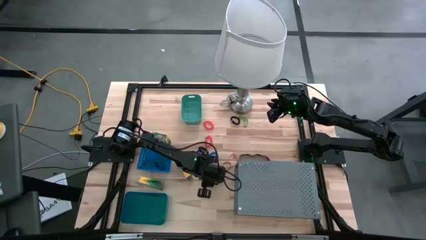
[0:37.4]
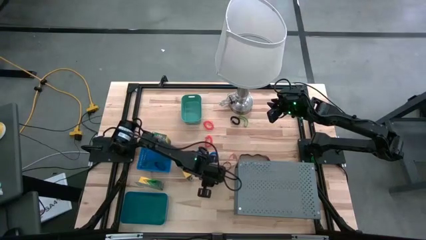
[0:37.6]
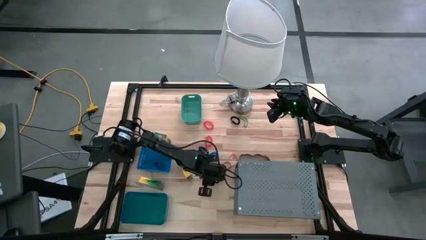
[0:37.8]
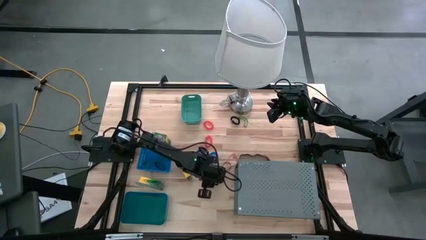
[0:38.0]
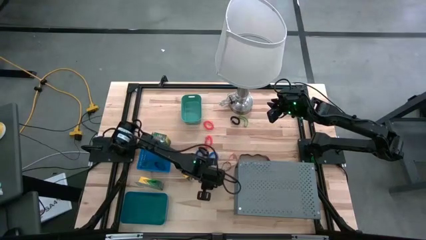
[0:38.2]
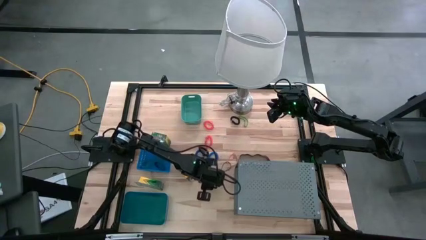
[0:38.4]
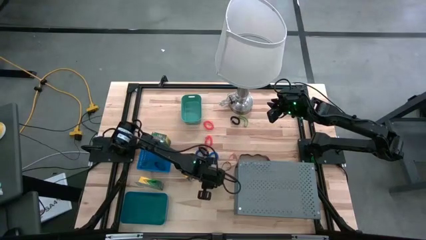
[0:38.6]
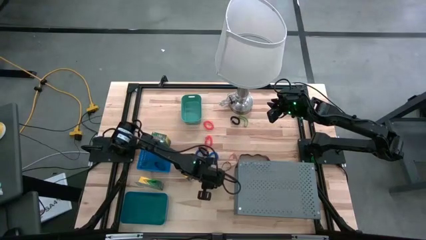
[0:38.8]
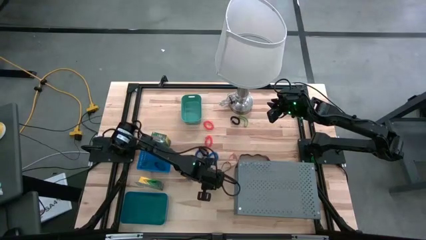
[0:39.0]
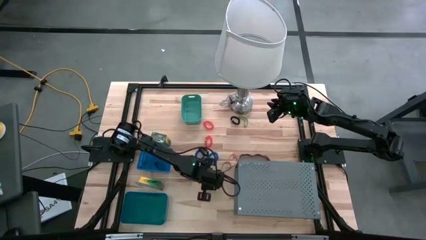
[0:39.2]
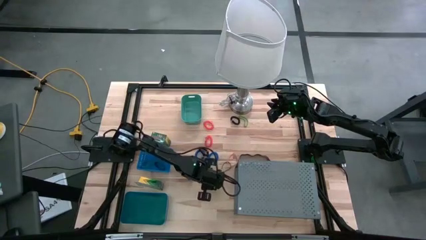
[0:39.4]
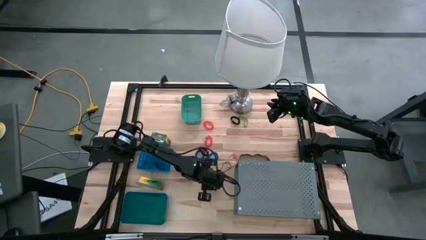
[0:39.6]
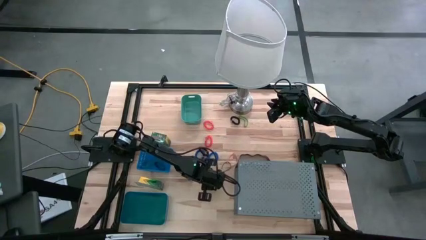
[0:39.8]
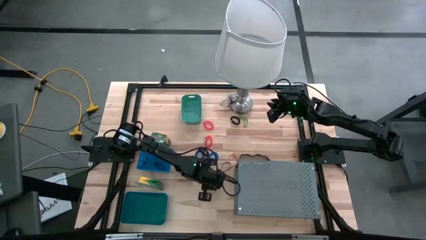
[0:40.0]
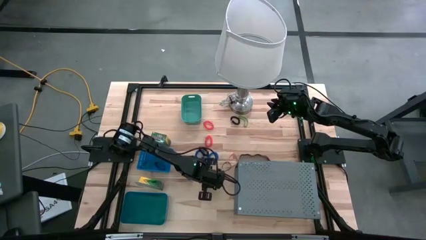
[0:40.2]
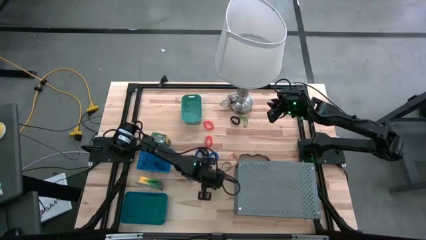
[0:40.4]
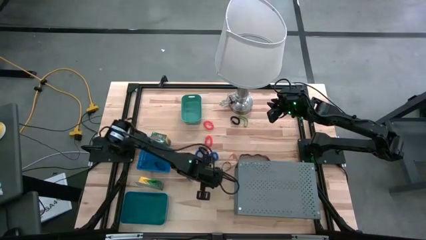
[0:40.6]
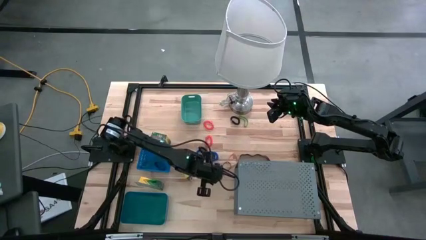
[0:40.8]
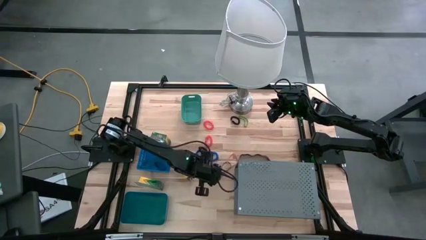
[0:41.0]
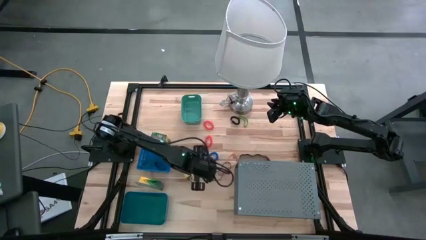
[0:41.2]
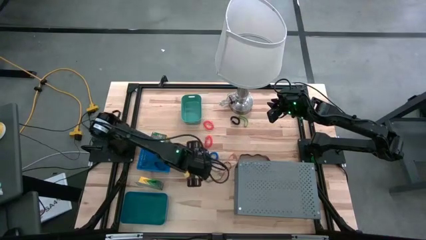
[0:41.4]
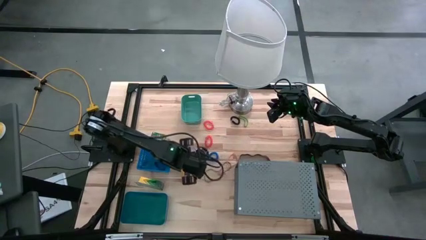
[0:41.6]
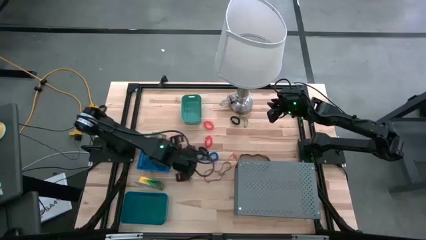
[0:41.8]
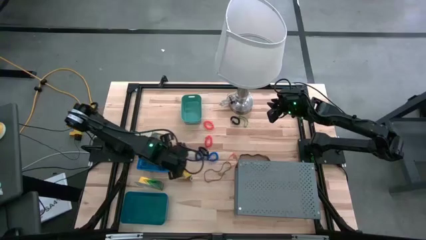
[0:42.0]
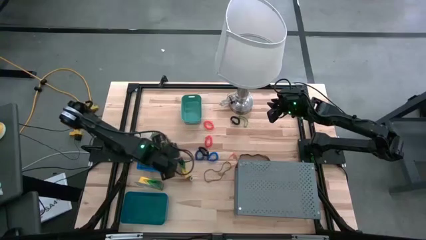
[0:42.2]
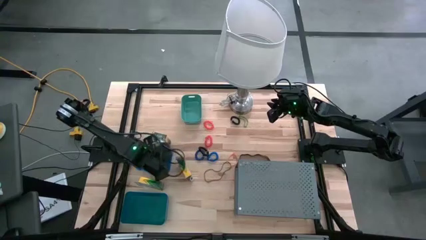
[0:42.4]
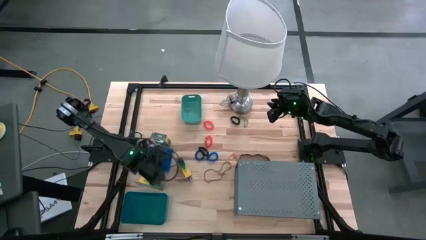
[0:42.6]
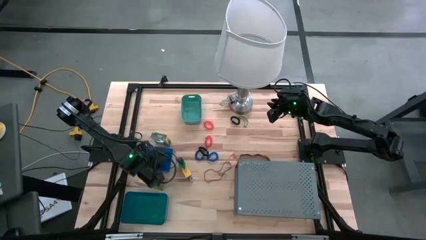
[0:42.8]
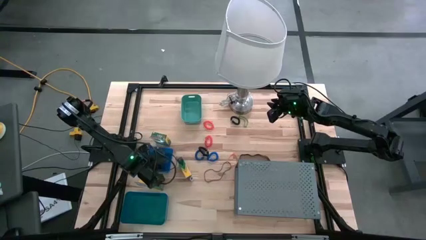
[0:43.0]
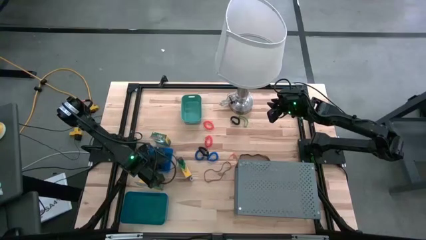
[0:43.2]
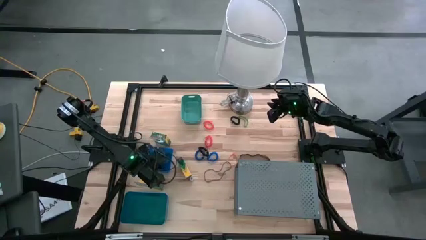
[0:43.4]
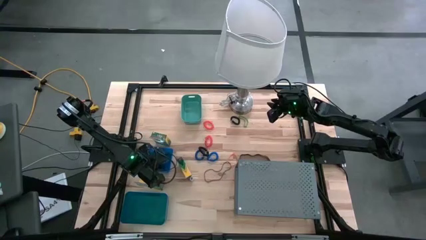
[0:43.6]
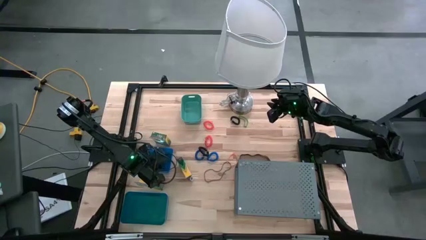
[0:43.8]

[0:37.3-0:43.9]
Task: Pick & Place Office Desk Supplies
Put the blue rubber bands into the top blue bin

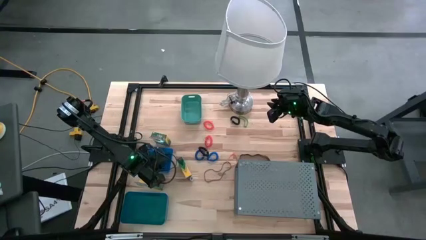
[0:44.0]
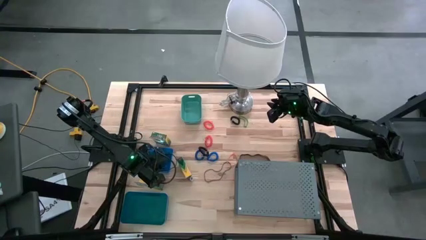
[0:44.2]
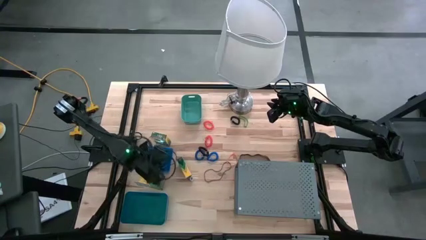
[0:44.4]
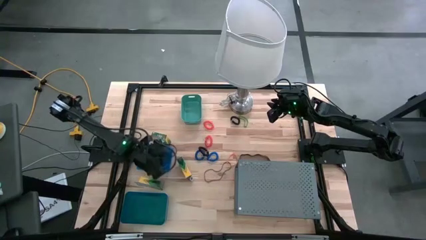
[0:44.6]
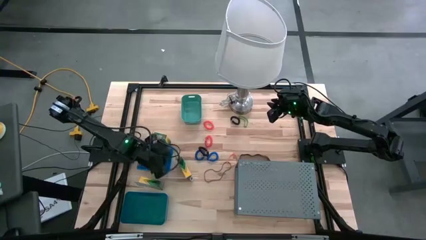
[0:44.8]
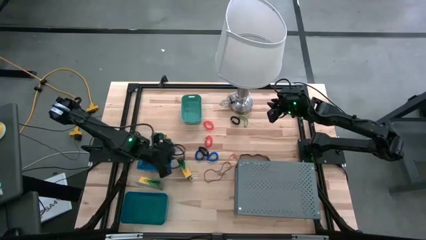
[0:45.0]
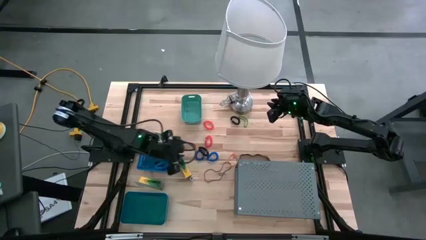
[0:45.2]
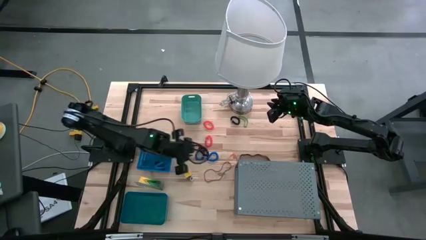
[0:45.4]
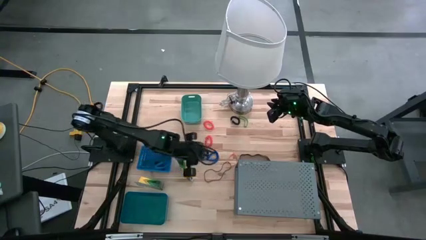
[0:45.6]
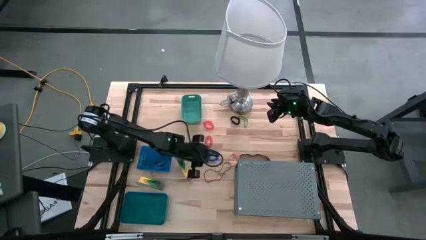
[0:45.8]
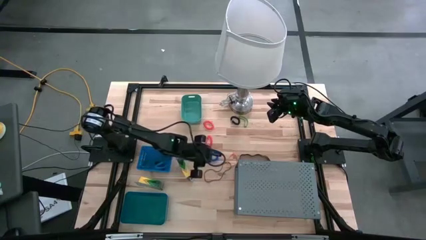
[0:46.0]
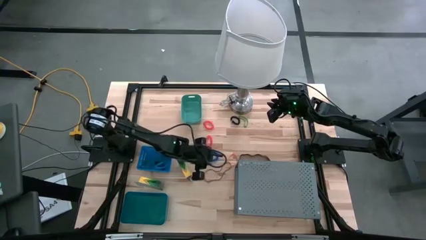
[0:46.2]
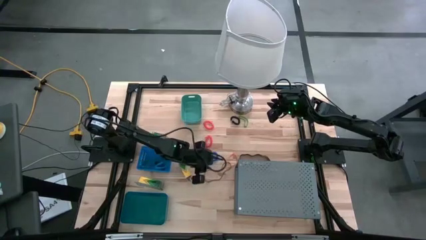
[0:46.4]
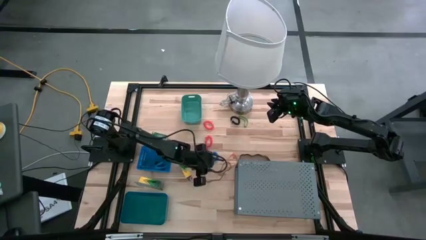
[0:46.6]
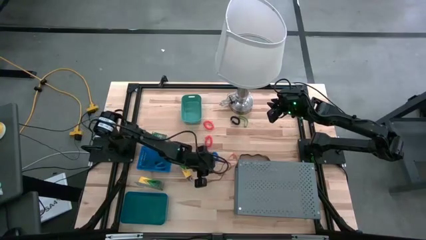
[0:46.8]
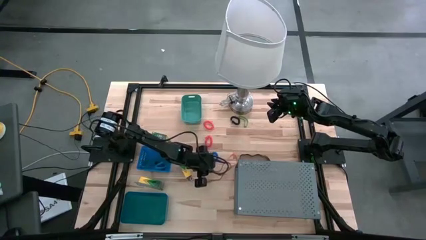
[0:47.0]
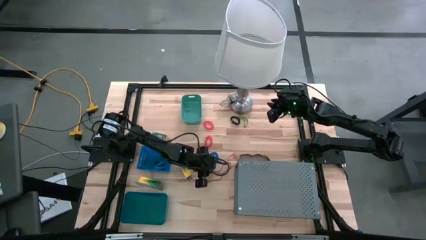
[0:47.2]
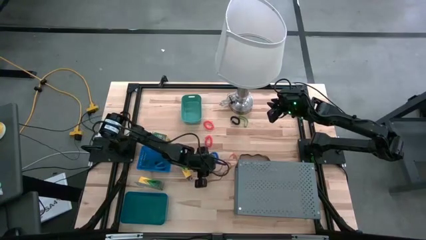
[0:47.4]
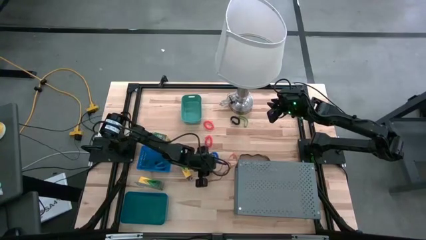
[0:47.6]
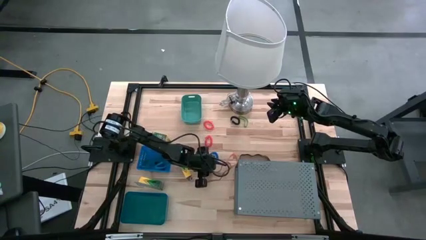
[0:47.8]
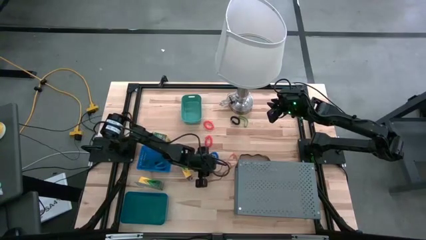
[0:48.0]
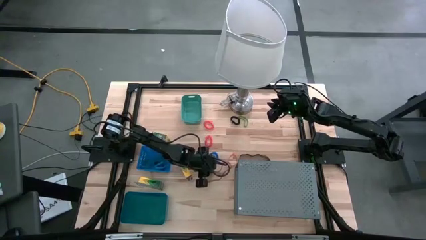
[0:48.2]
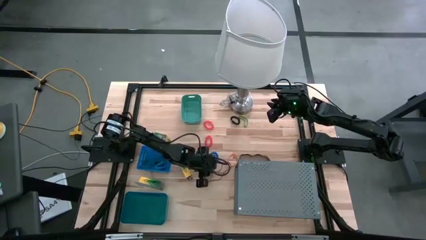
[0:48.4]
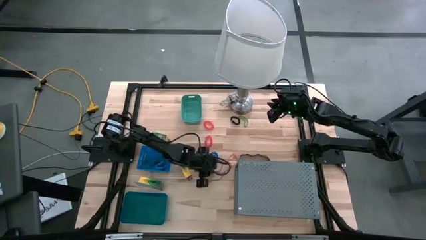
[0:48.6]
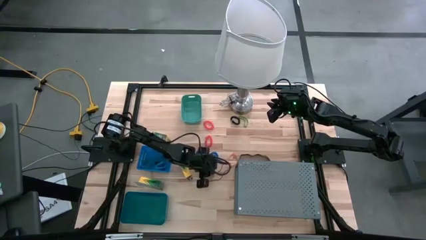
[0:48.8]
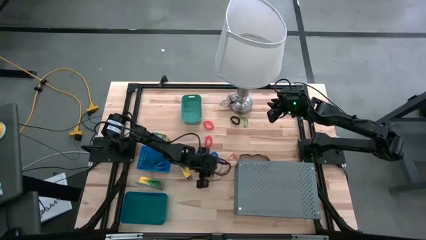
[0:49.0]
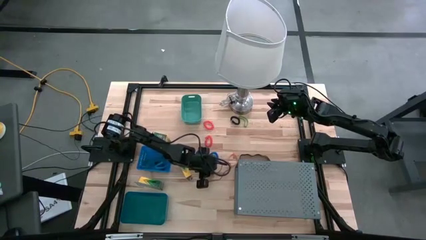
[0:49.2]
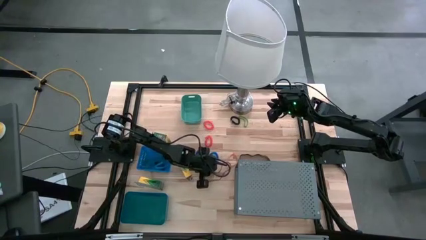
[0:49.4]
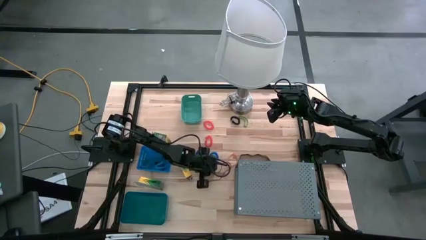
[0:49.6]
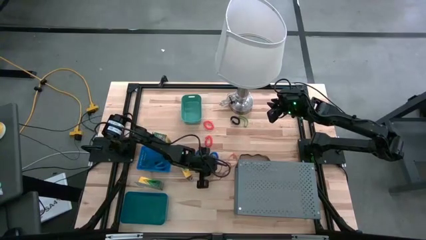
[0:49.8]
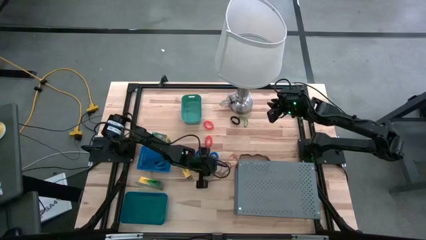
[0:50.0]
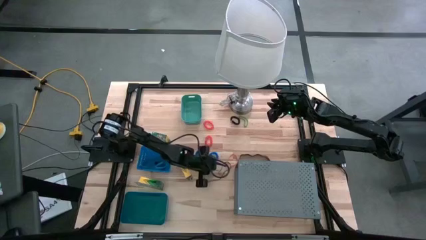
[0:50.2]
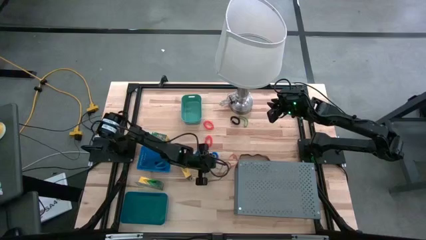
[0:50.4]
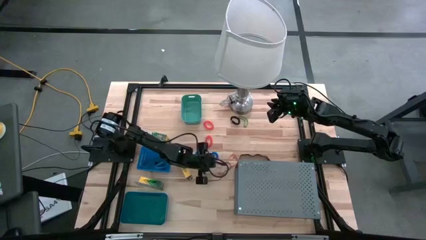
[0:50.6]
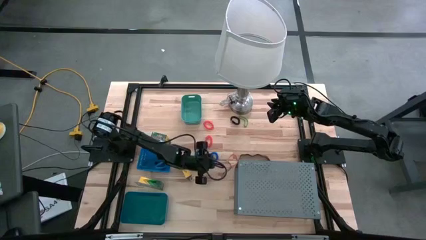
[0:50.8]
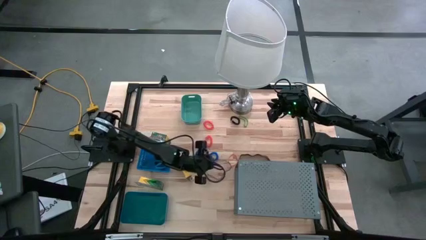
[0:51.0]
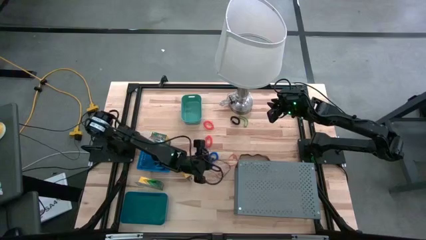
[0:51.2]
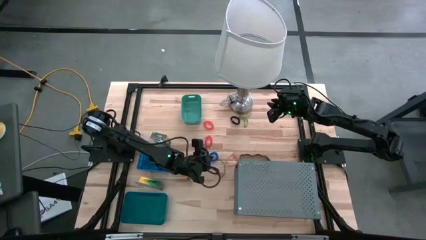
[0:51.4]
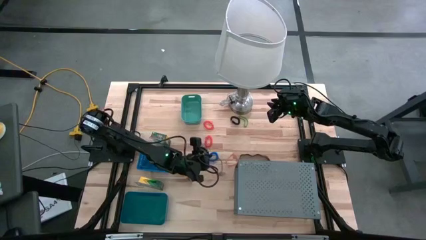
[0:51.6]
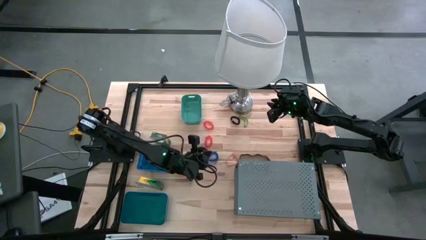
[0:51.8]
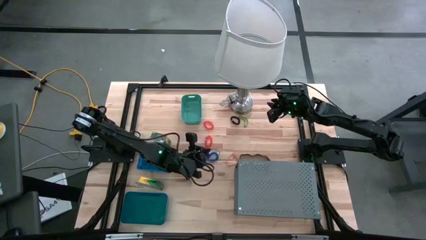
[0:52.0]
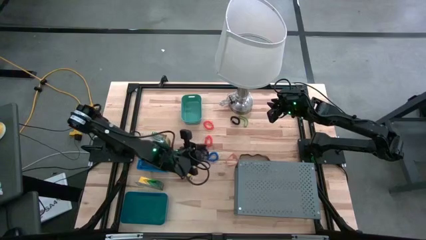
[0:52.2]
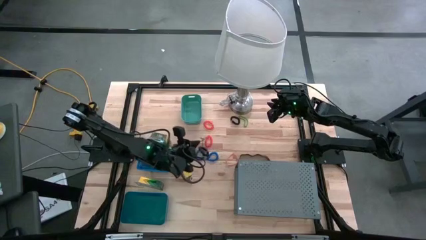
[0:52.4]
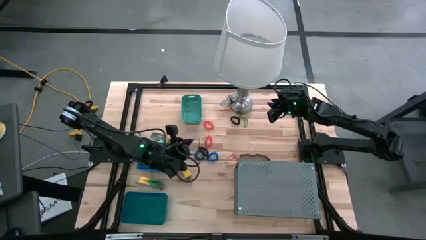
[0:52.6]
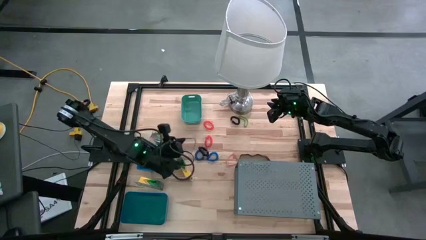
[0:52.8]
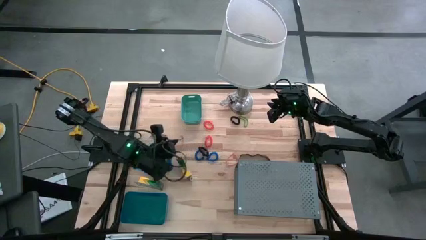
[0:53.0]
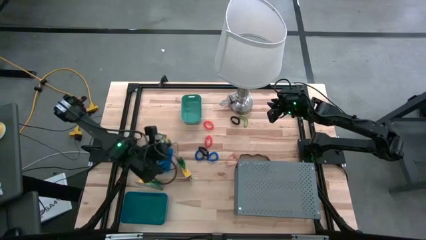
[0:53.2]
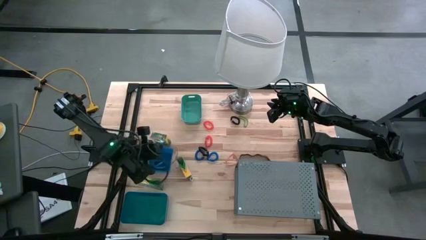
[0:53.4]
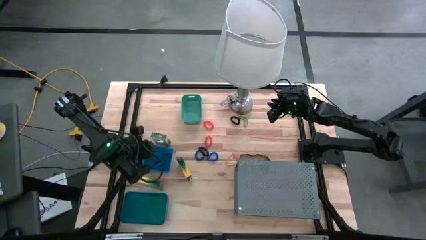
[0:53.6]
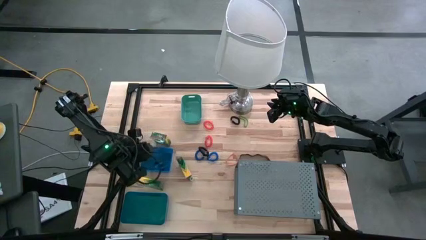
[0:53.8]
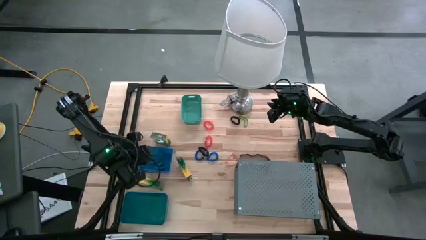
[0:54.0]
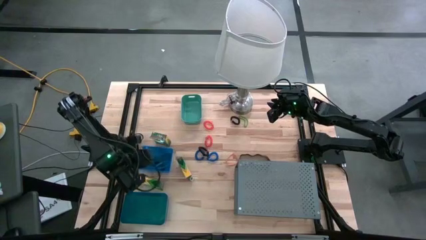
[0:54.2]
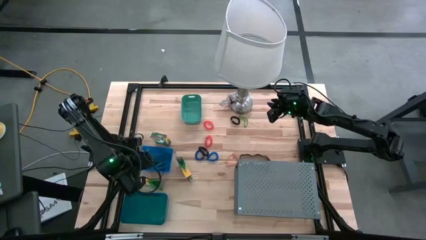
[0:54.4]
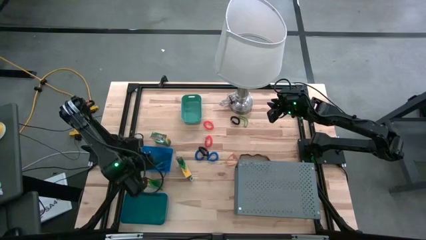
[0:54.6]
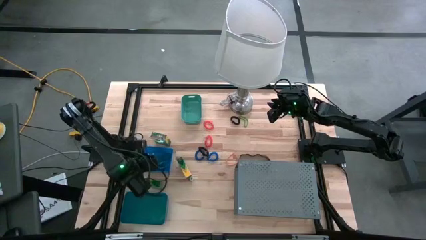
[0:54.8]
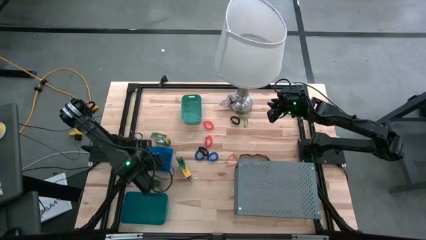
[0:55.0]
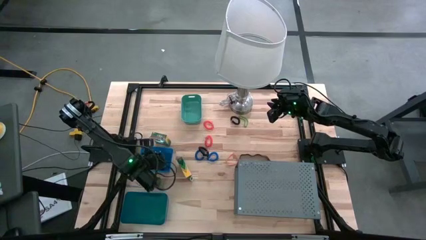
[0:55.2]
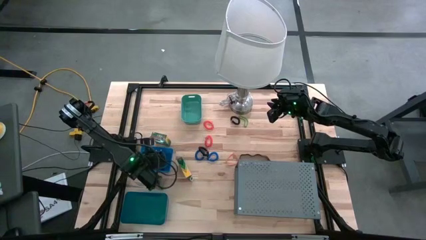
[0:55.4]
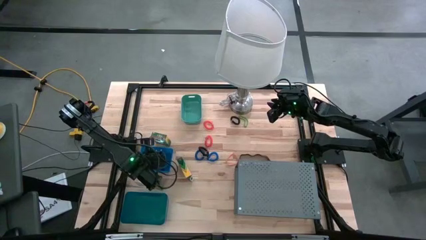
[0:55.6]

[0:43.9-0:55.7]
Put the gray rubber bands into the top blue bin
